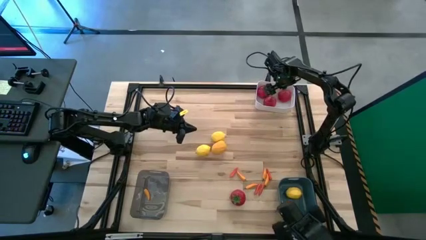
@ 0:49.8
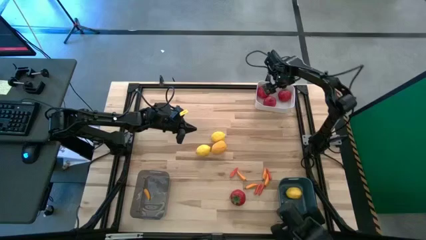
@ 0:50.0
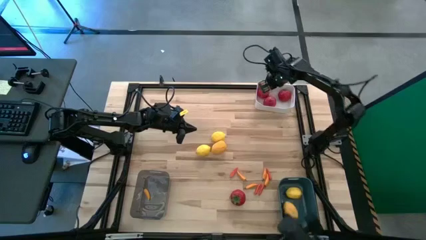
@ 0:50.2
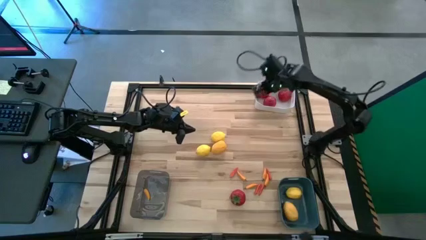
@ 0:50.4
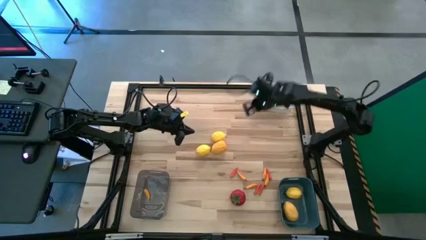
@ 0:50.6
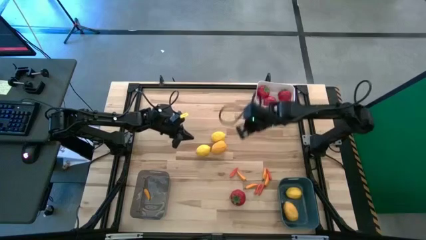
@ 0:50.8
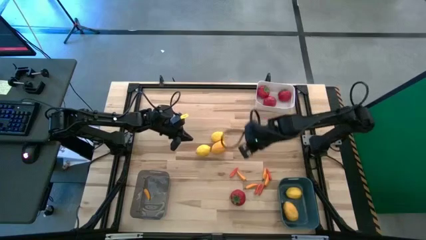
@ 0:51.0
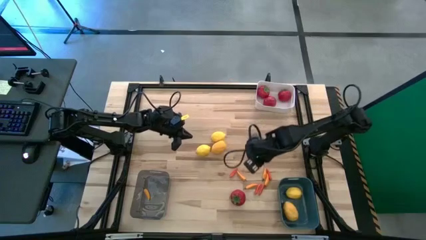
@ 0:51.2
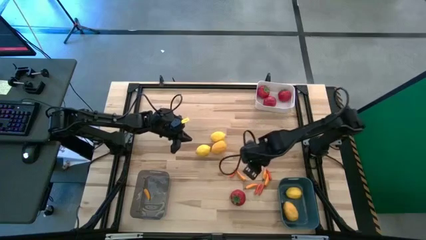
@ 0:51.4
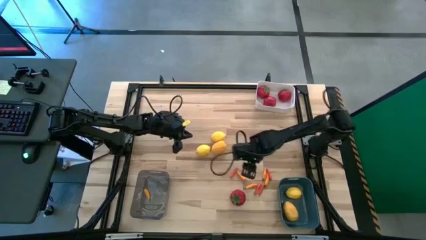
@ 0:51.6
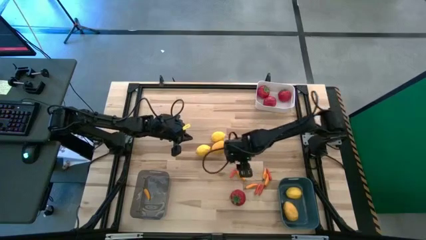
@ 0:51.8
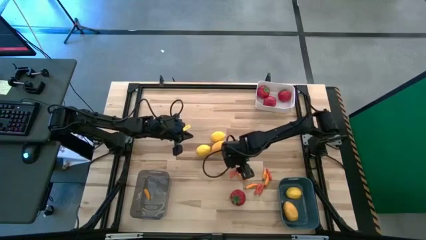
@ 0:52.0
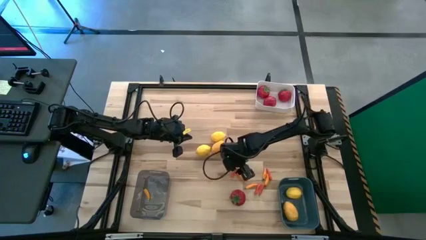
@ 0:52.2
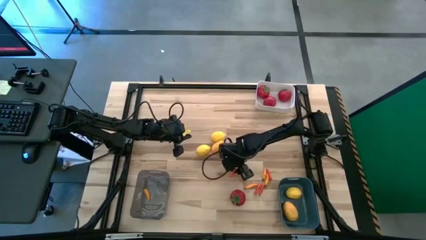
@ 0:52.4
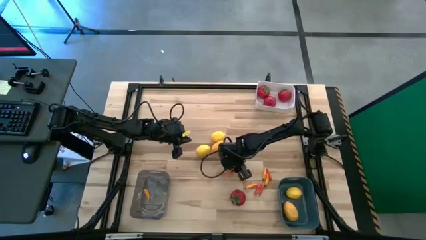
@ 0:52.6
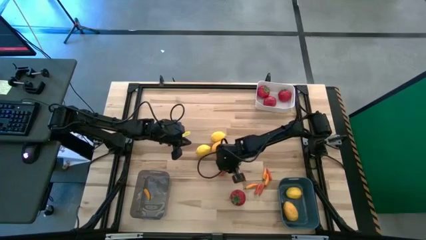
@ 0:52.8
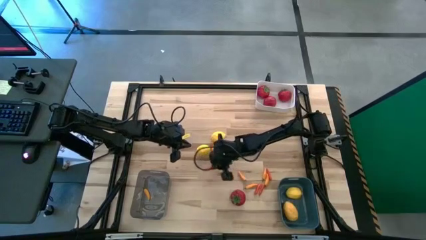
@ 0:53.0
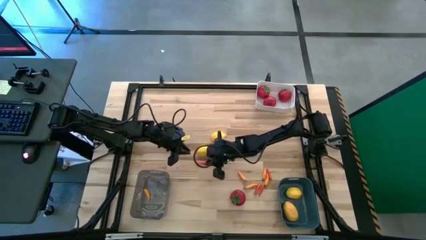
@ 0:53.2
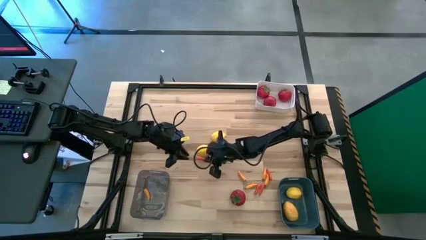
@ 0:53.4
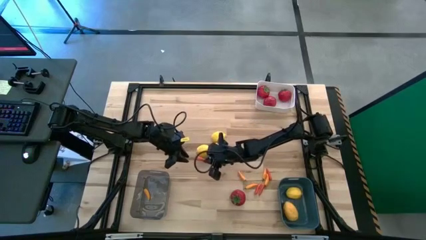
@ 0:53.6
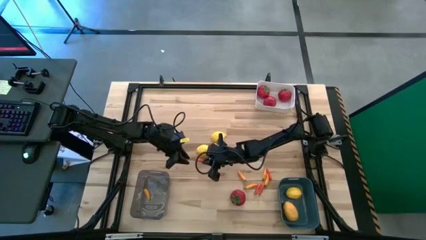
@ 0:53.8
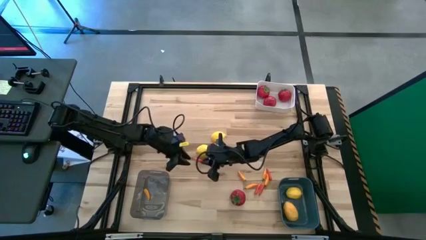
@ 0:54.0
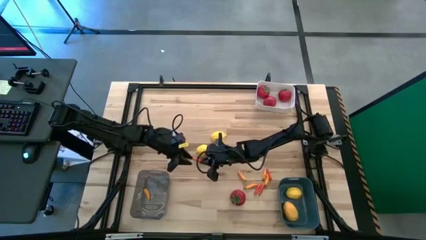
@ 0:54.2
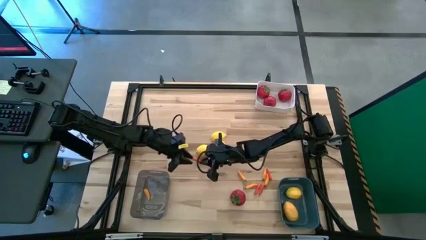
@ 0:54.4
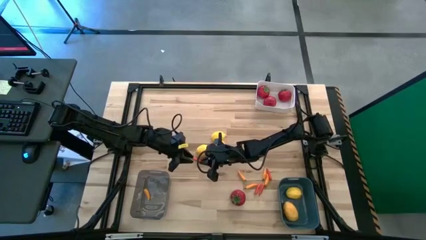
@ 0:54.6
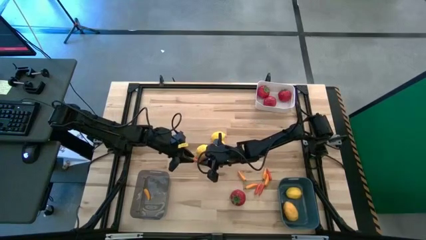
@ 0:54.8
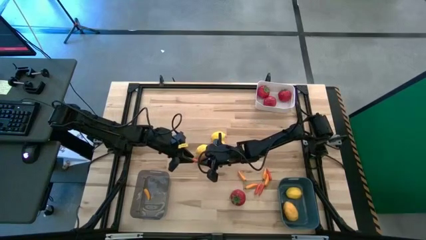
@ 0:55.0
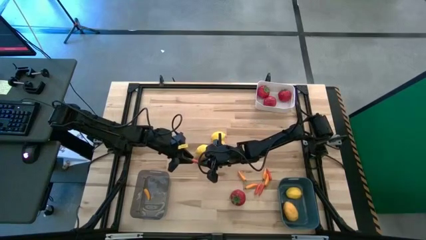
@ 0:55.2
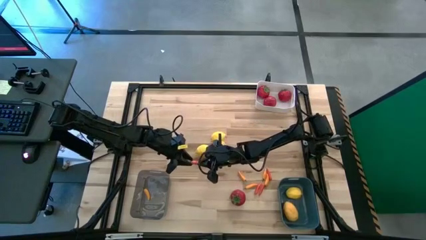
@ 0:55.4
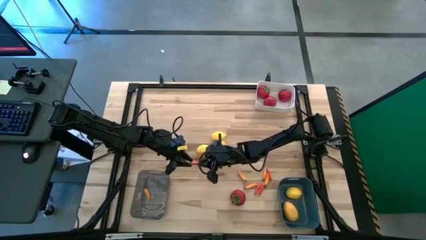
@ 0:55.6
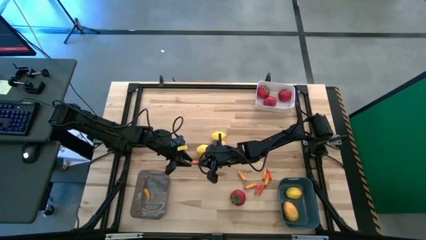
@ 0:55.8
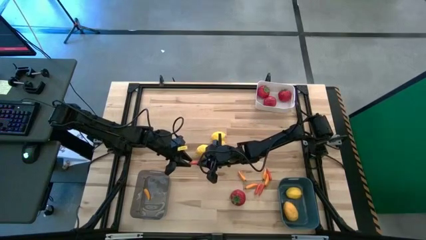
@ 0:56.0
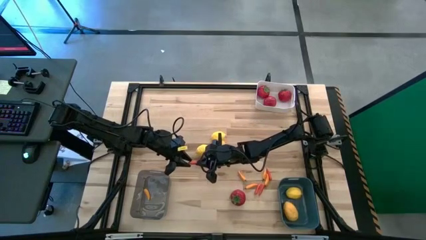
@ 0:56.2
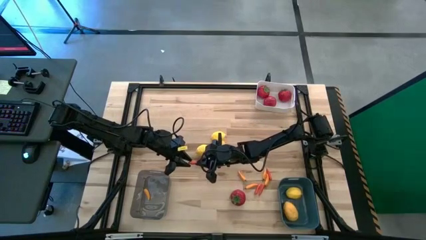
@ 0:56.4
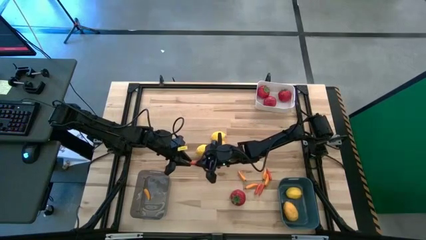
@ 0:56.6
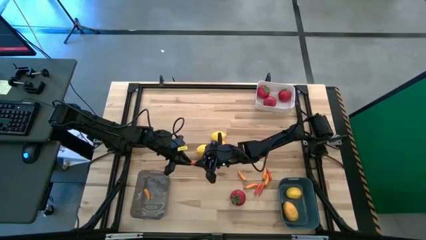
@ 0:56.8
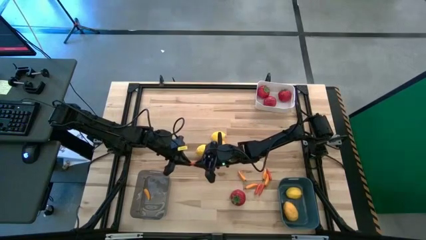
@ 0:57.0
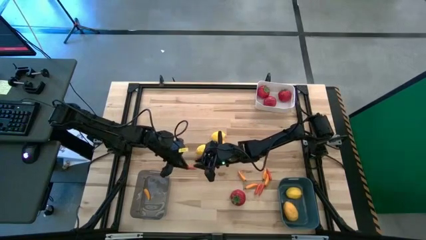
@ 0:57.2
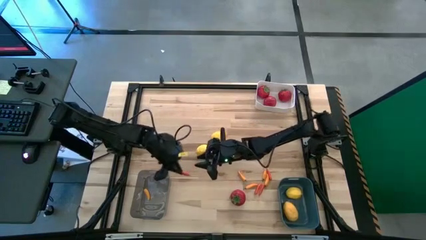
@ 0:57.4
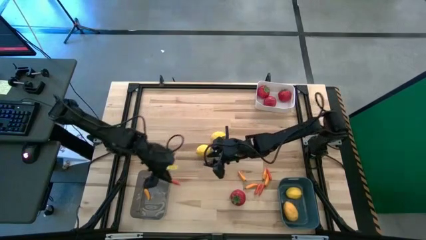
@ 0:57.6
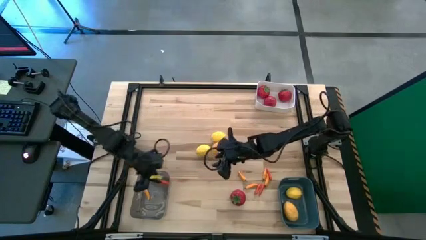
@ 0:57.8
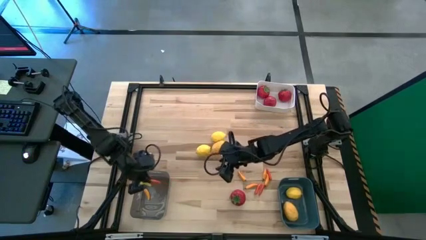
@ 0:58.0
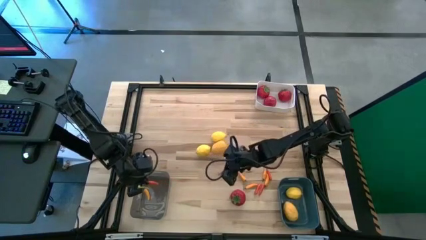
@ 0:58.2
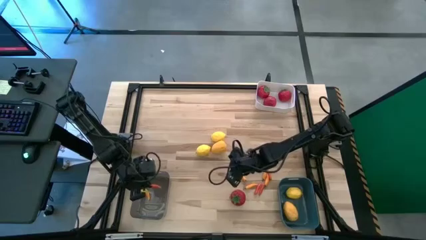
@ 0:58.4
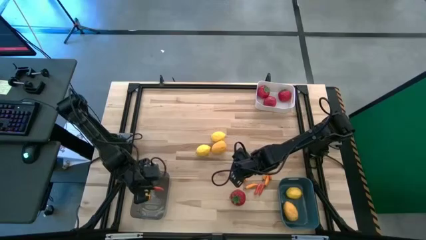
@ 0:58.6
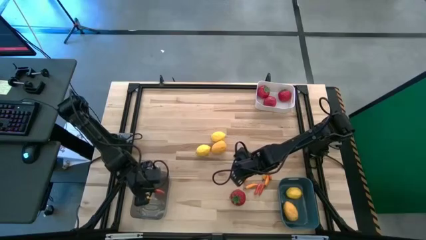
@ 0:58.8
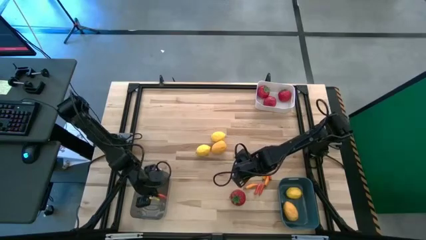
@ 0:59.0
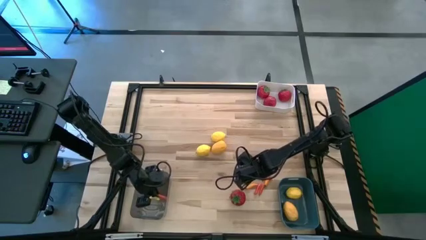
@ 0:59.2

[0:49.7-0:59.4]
Task: Sort produce into baskets
Put the orange chili pepper into the black bin

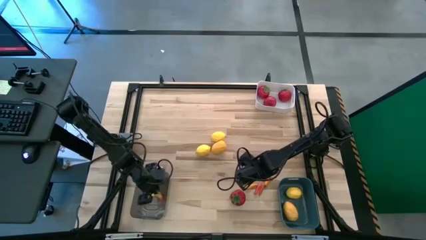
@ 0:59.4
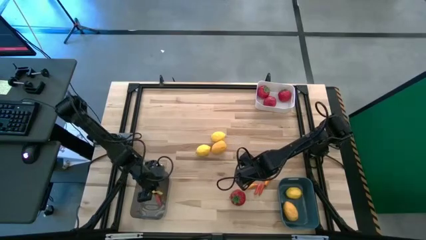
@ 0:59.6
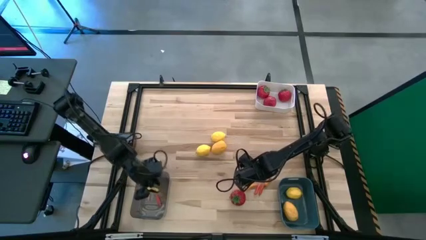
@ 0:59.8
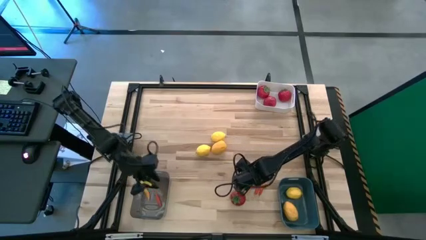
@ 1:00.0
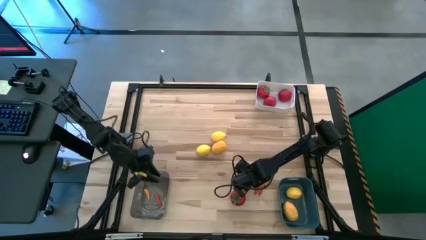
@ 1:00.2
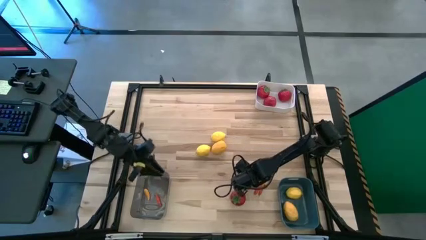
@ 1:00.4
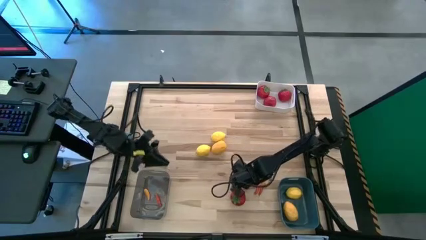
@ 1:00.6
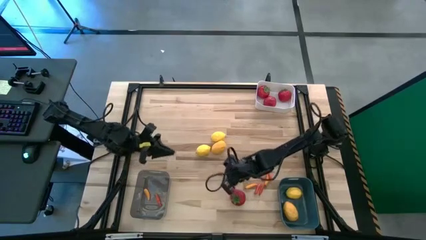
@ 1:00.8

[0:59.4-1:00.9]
Put the yellow chili pepper into the black bin

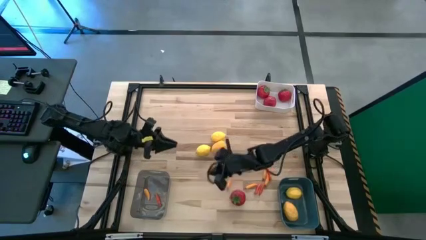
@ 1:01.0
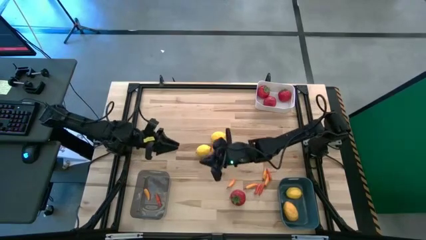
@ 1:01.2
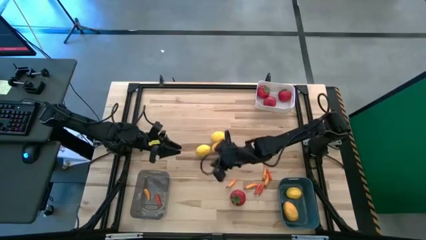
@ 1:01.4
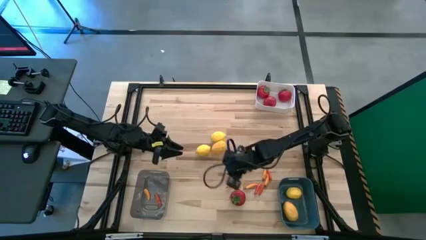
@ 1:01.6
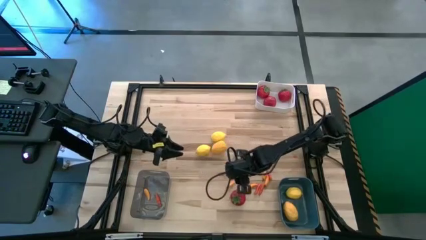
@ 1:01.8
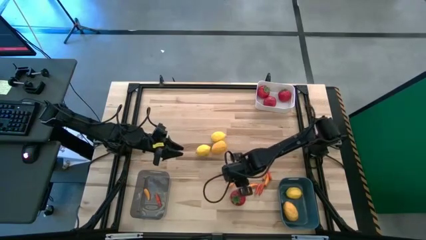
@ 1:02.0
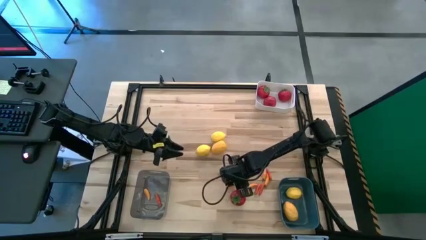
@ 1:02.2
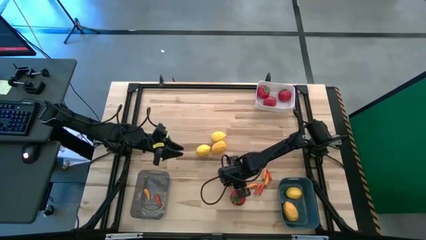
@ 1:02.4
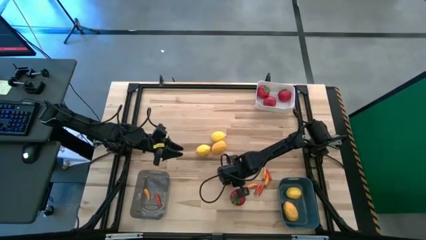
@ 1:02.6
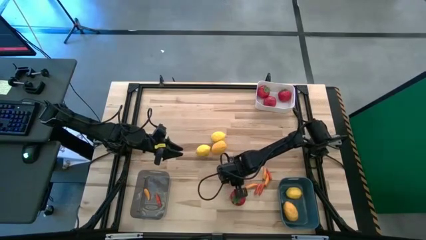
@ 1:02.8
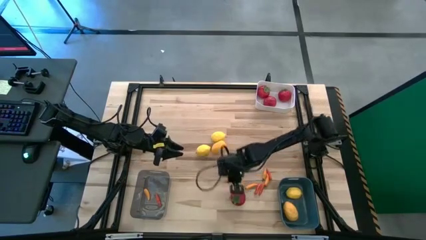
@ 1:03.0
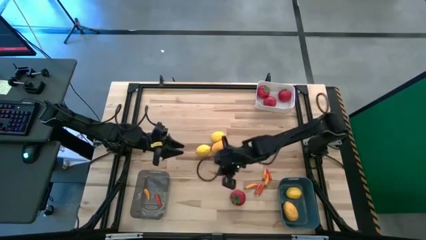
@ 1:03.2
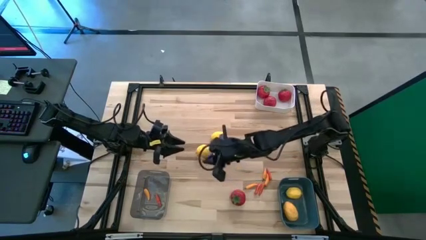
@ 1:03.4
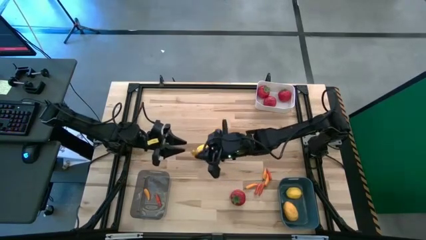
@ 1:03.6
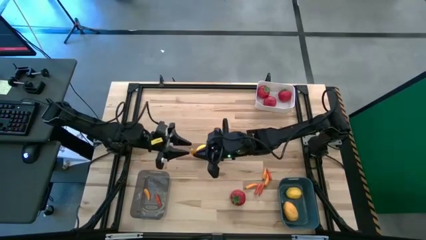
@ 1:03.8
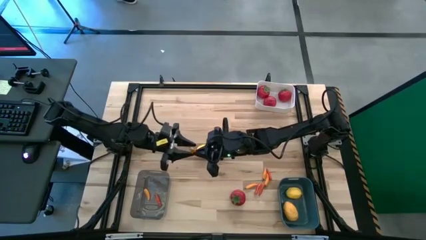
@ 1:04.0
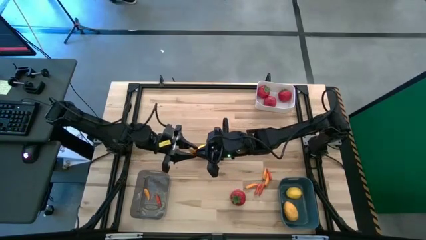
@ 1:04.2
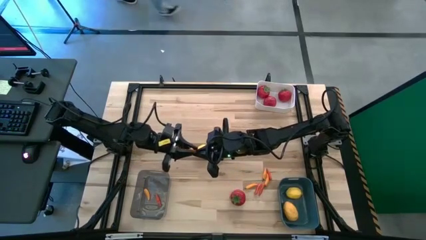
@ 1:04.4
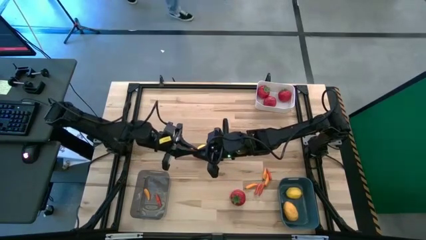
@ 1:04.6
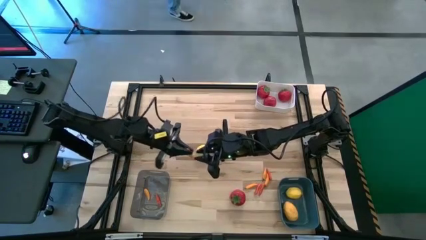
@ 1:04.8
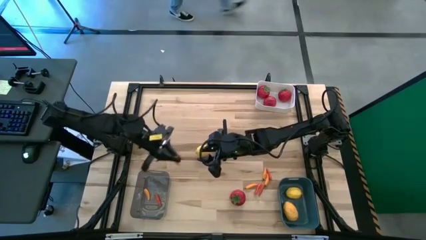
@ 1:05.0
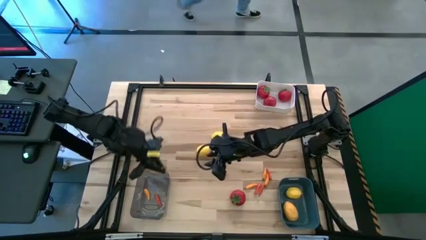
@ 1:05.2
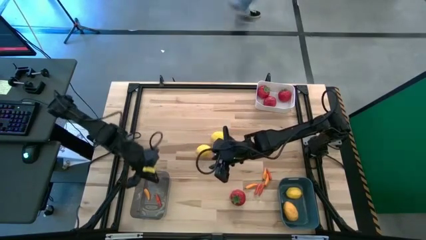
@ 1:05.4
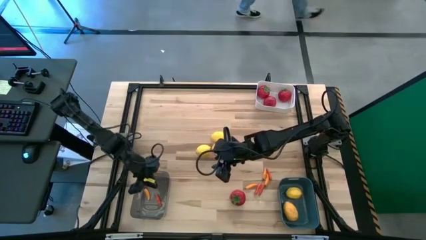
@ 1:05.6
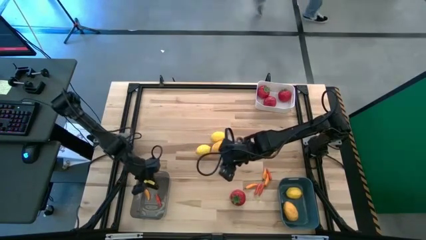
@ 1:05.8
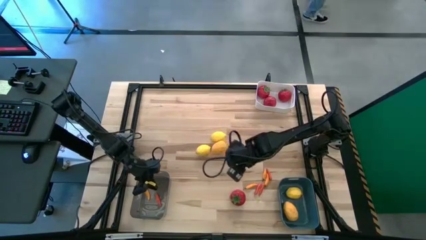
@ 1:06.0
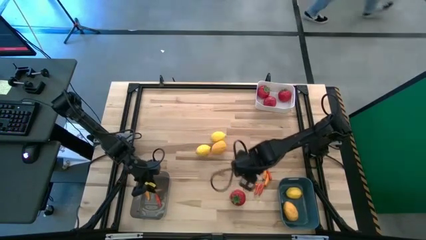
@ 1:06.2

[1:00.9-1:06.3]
Put the yellow chili pepper into the black bin

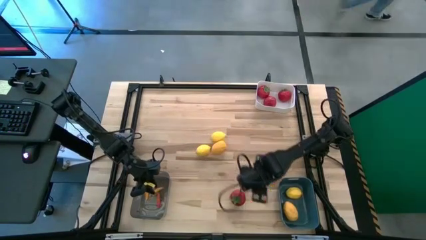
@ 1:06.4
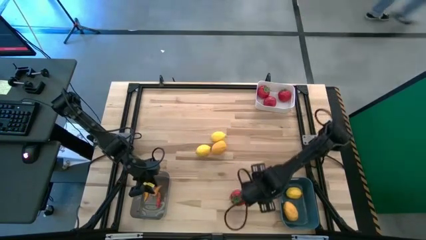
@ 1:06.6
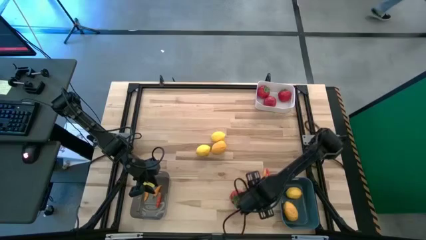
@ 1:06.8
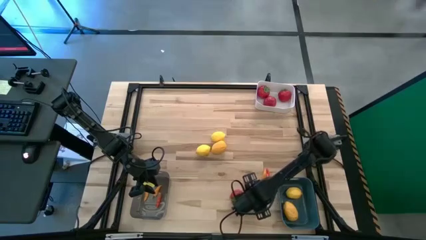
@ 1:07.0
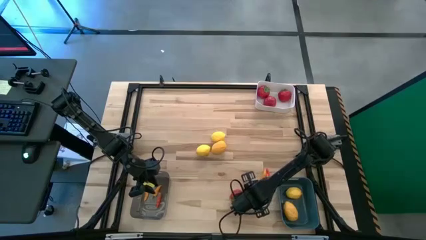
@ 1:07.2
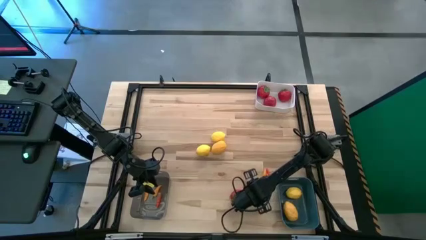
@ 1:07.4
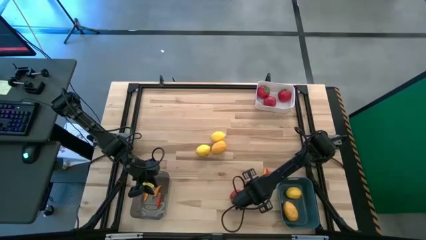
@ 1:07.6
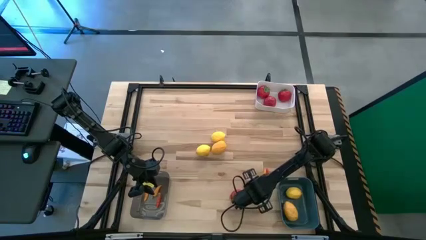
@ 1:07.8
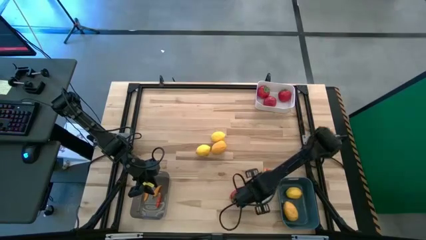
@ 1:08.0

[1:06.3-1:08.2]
Put the orange chili pepper into the black bin
